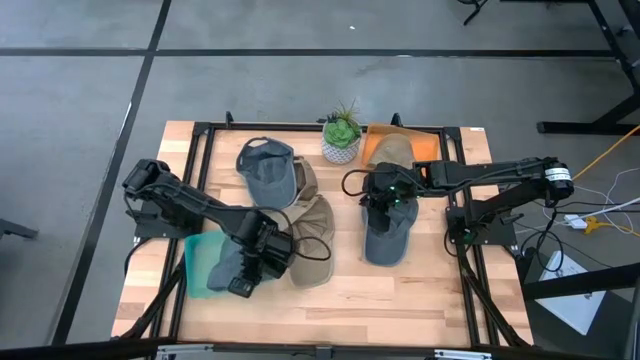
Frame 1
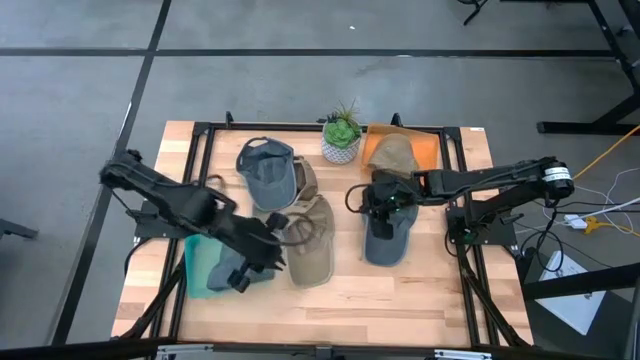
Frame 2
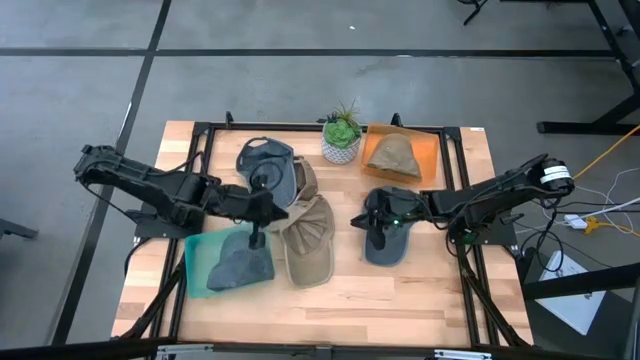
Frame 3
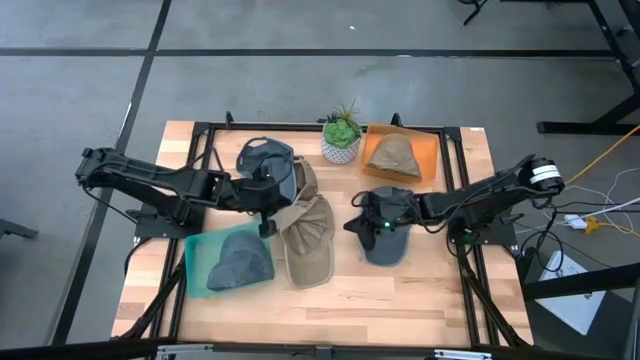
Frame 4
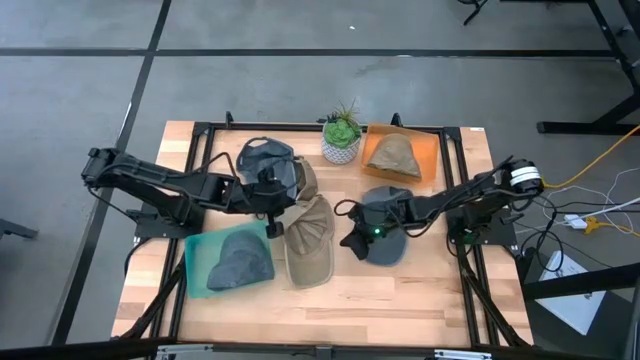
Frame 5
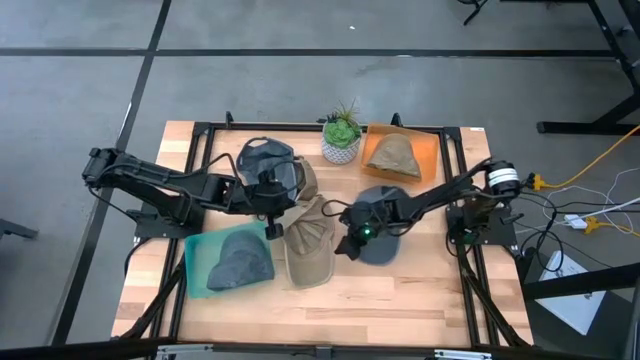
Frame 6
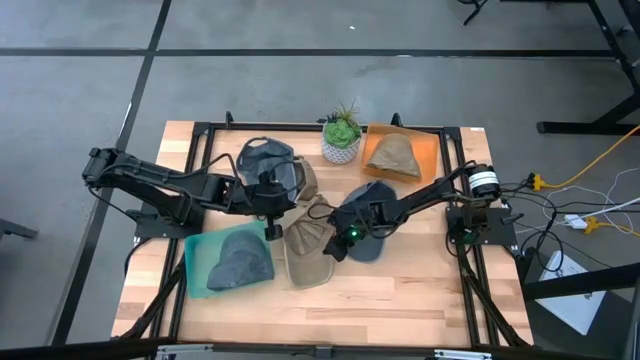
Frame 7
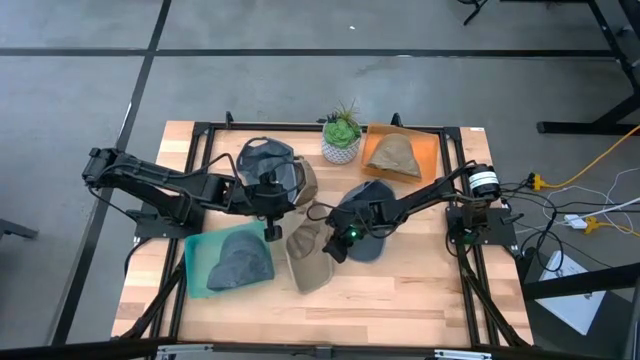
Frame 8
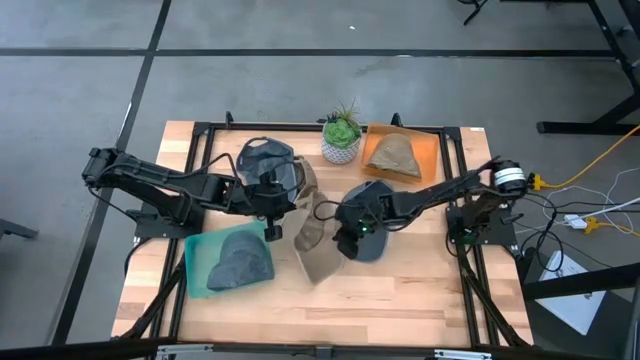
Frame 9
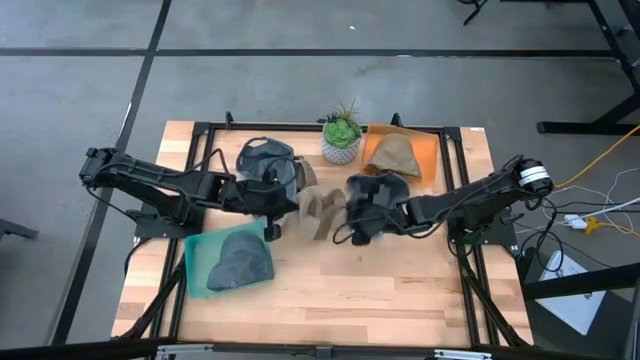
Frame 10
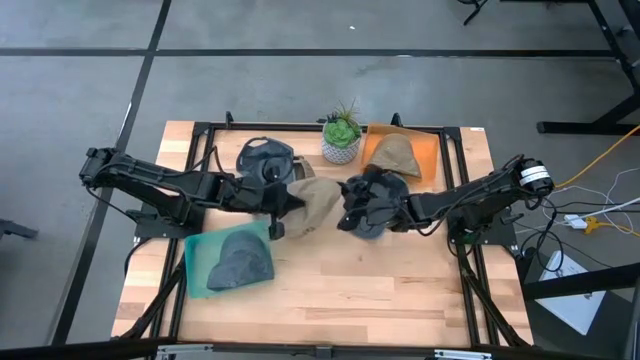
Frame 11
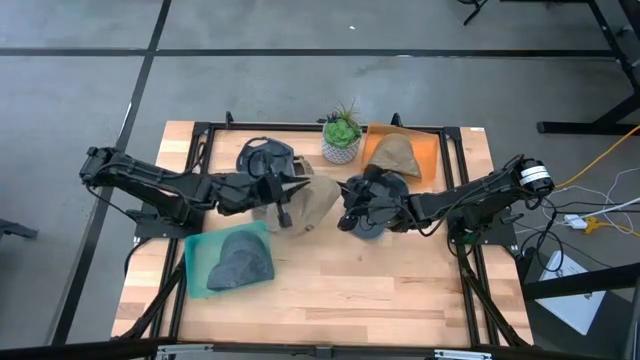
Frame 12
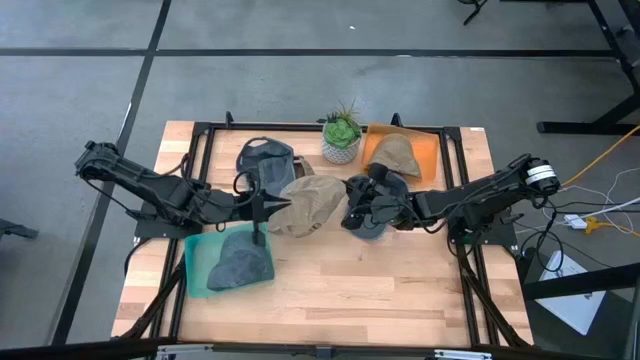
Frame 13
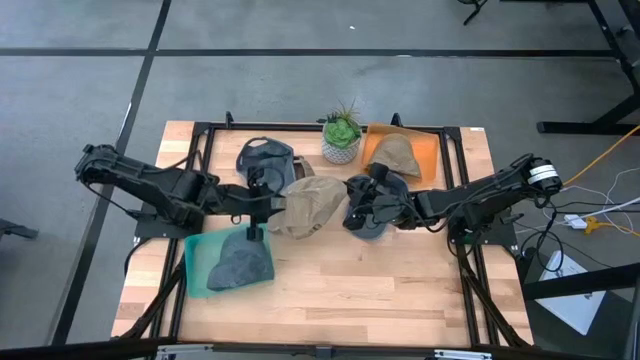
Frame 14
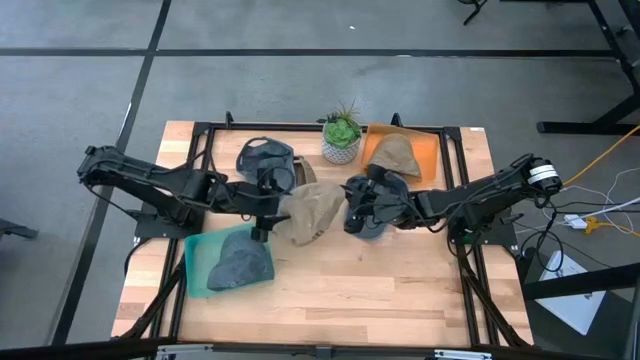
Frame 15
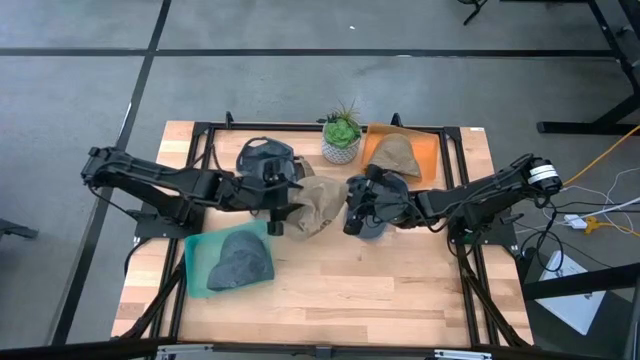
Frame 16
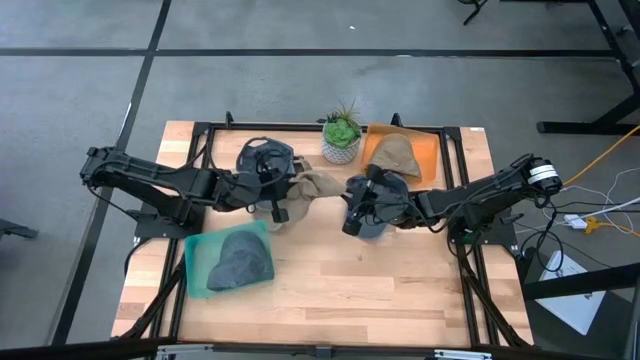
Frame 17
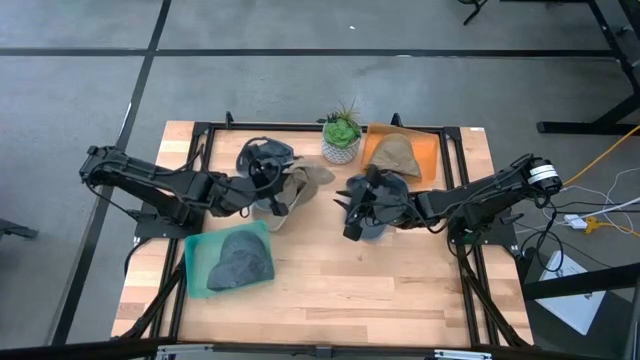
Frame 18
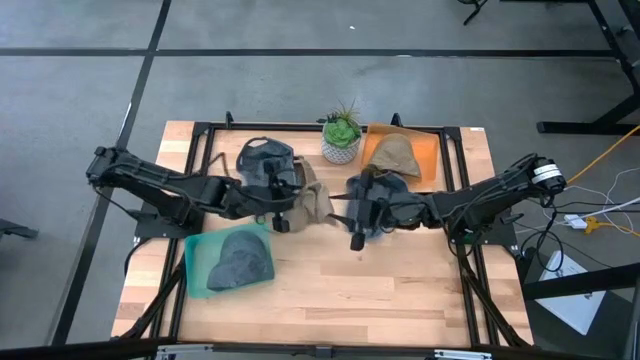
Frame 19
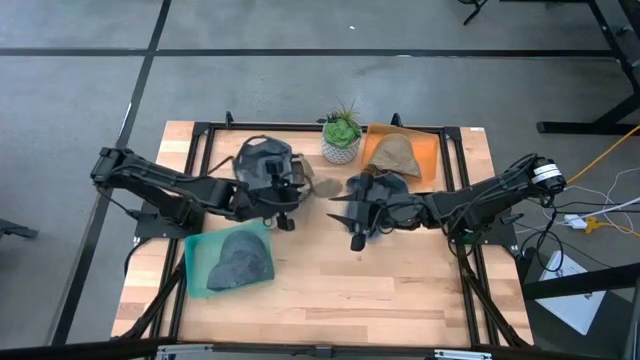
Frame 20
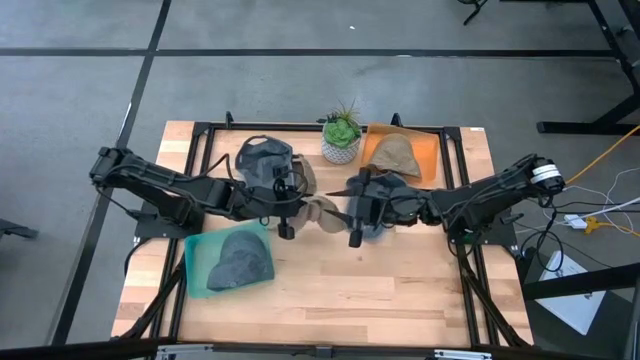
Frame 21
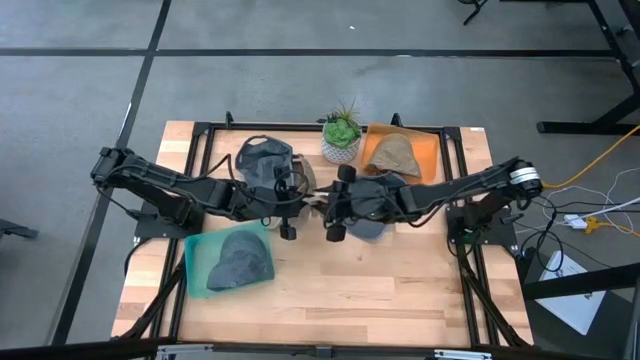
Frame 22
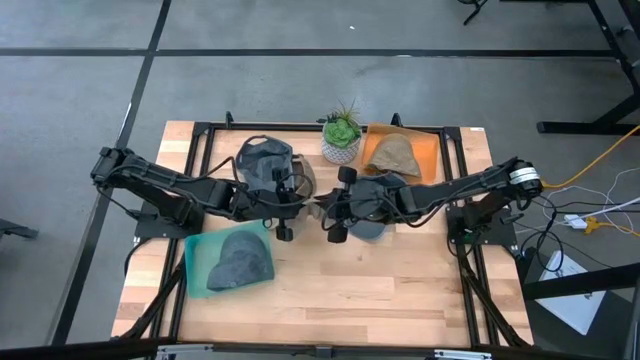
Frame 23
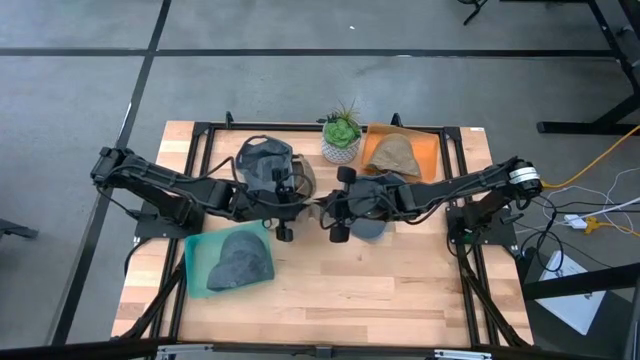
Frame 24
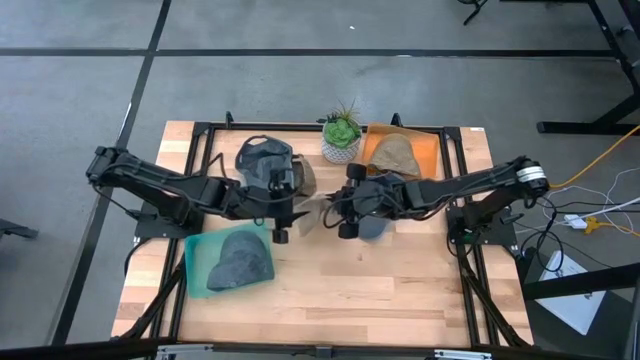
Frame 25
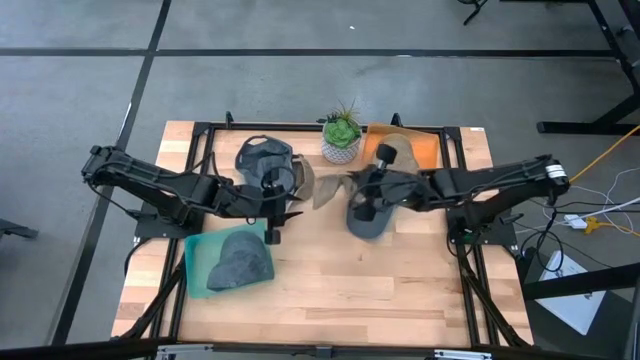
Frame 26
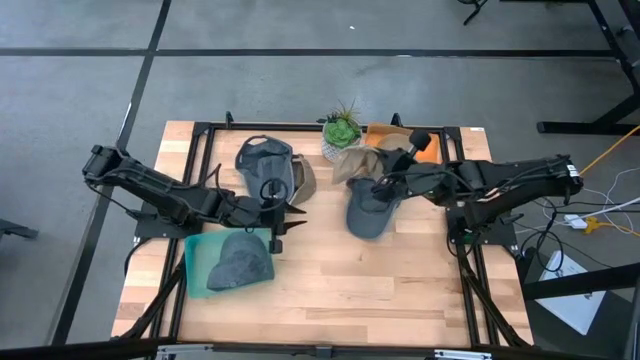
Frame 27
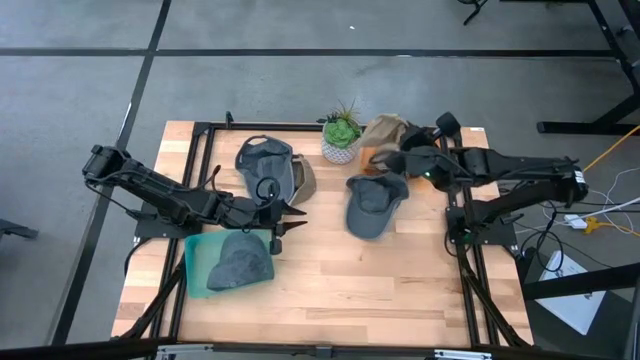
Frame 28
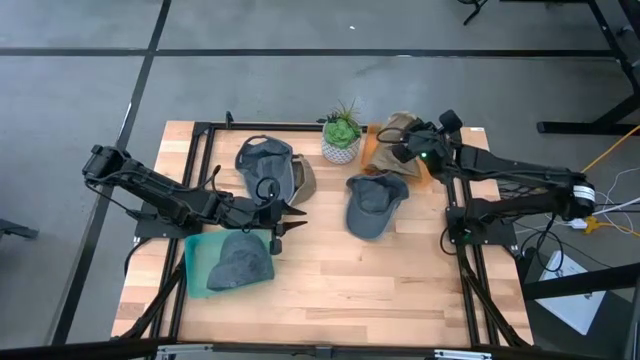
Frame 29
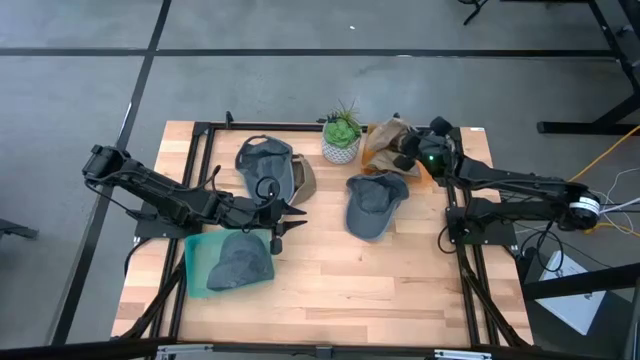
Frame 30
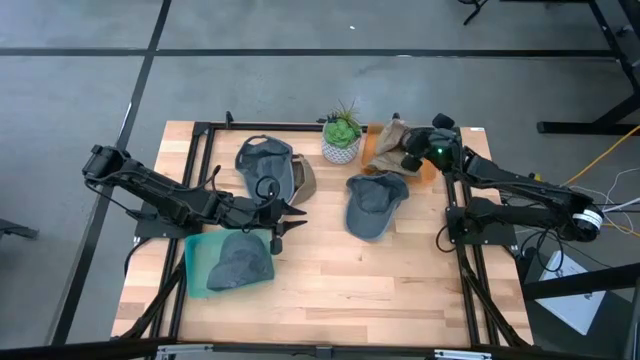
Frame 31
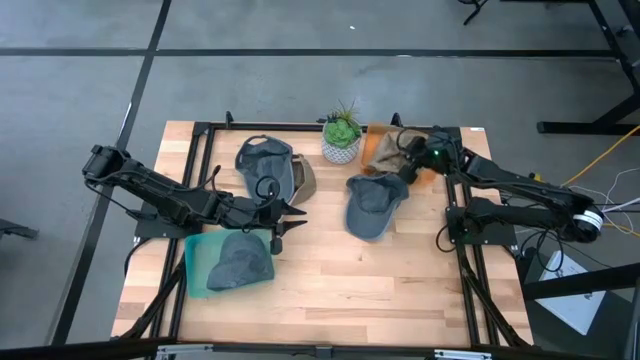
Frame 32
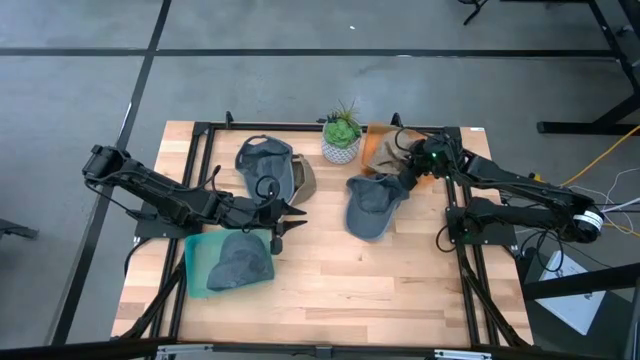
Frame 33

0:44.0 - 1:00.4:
Task: Pick & Place hat
Put the bottom brown cap into the orange bin

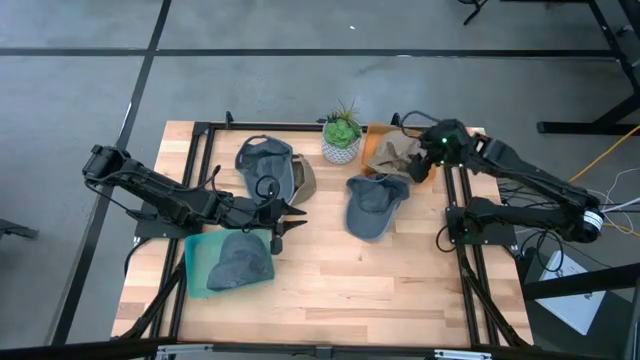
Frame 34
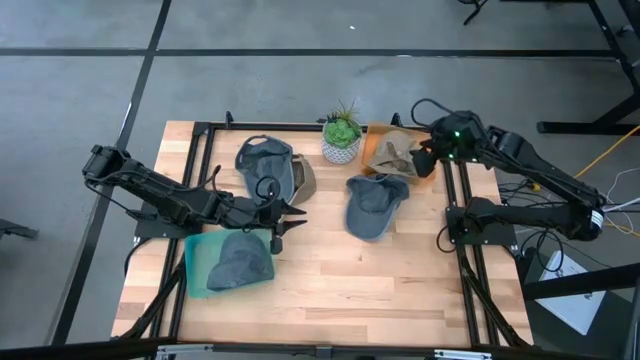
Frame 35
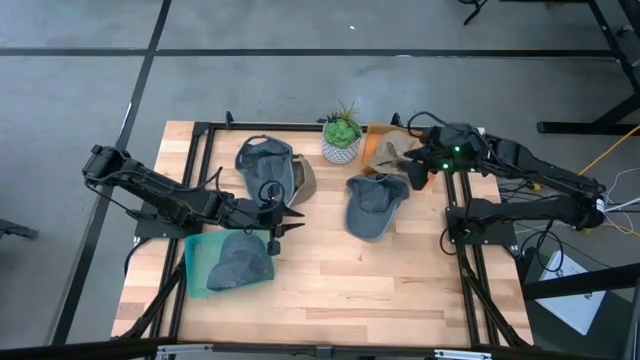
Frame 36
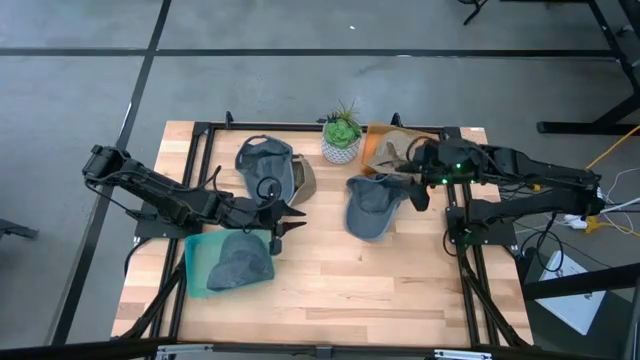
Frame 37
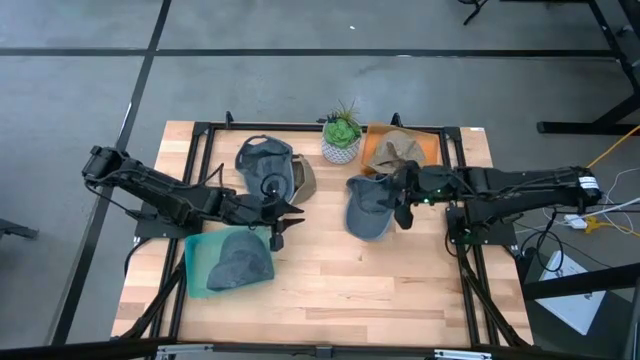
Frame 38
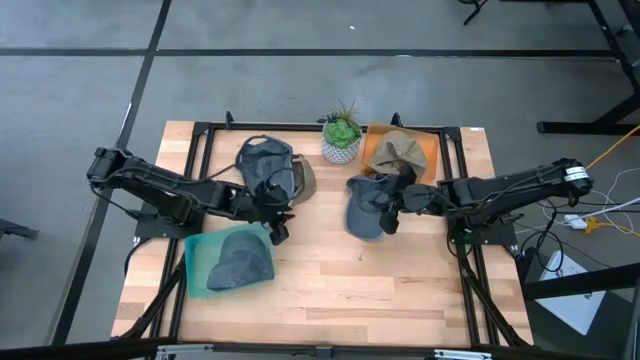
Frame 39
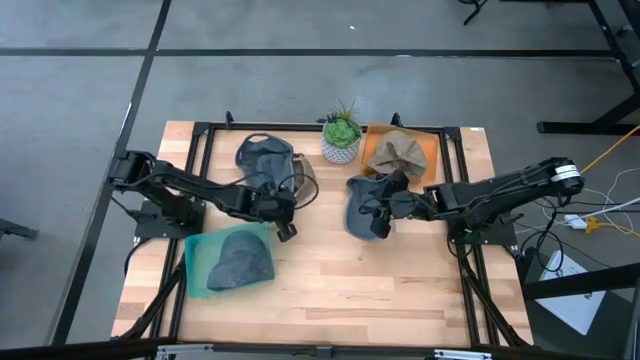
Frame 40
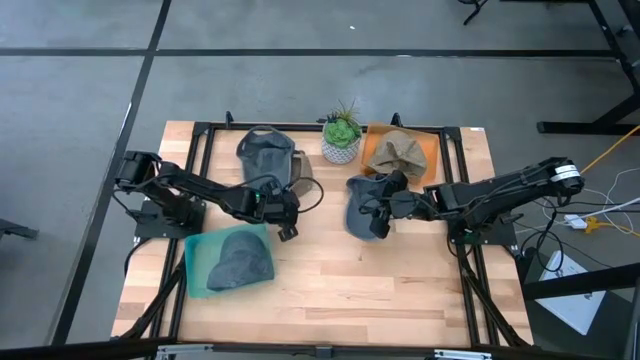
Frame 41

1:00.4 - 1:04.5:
Put the brown cap into the orange bin
